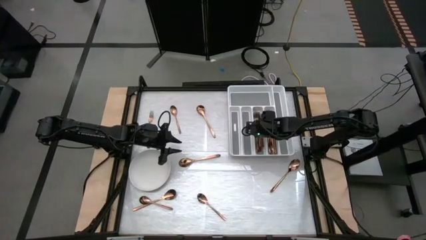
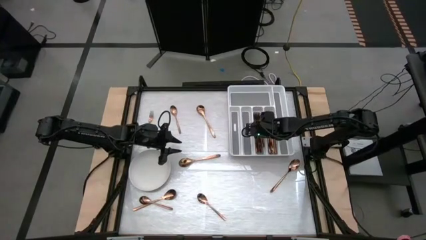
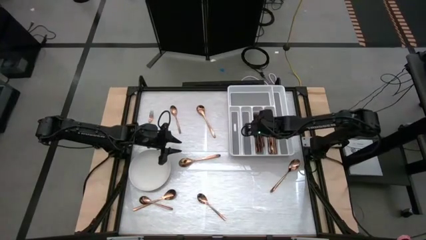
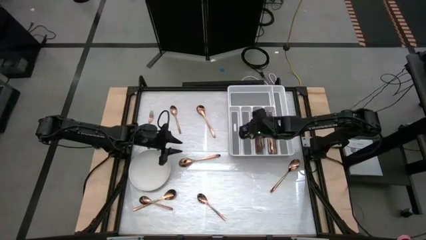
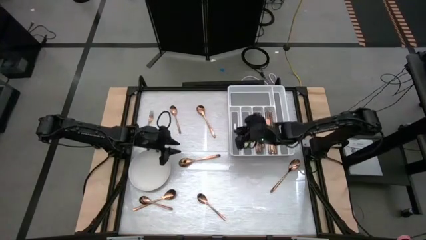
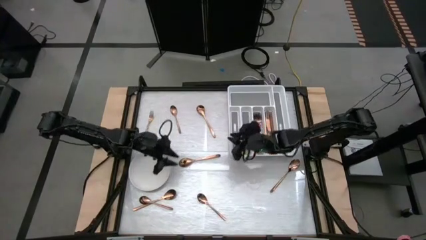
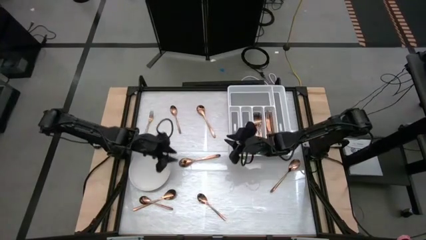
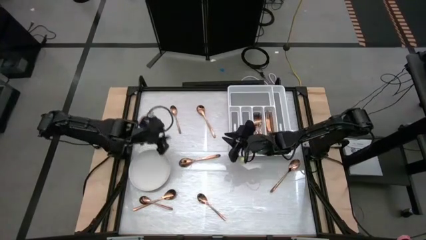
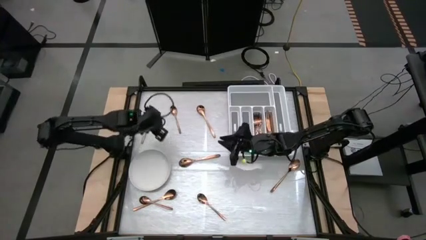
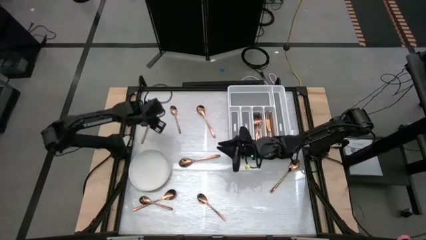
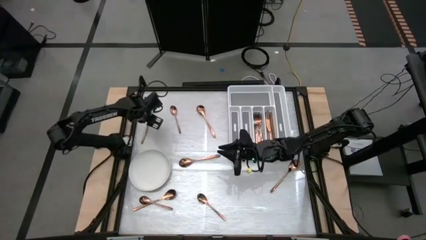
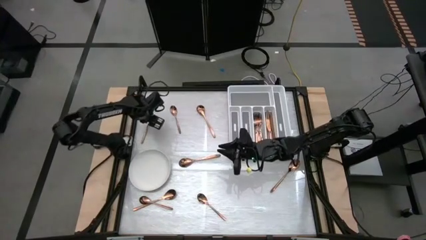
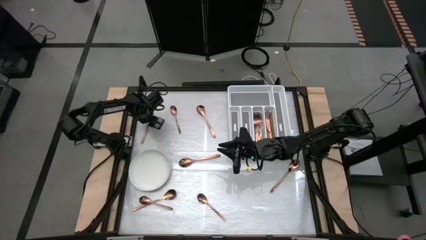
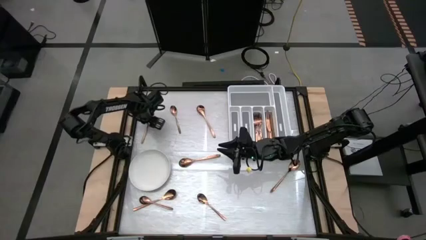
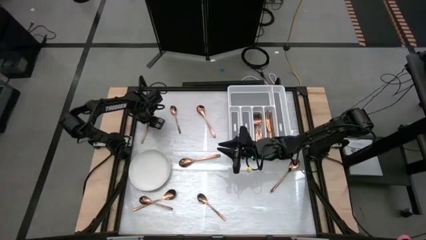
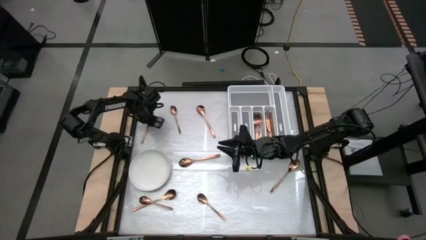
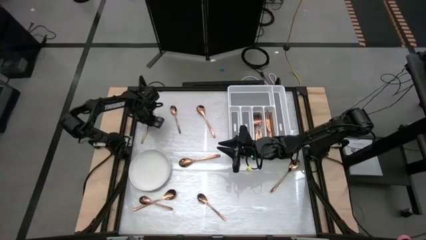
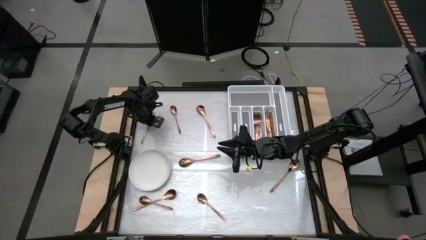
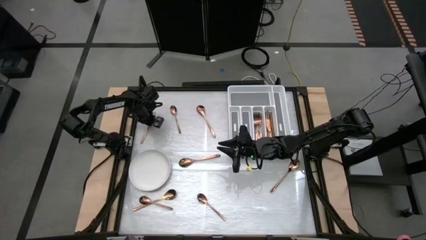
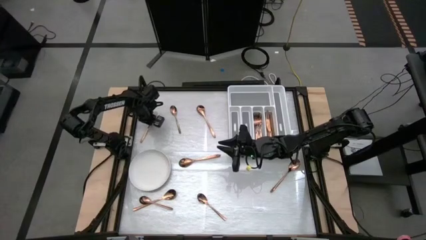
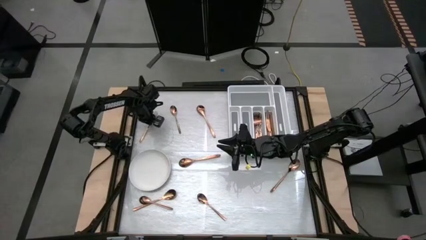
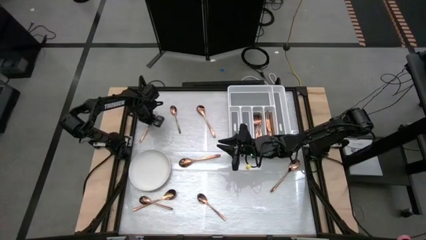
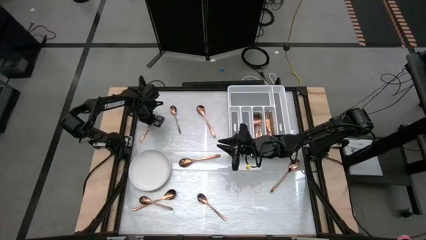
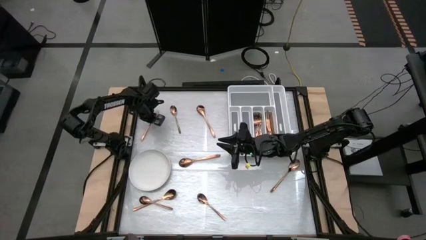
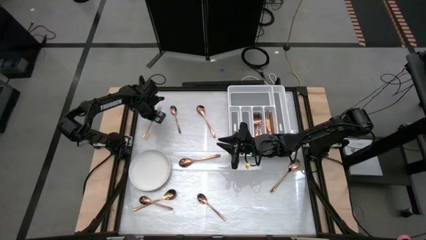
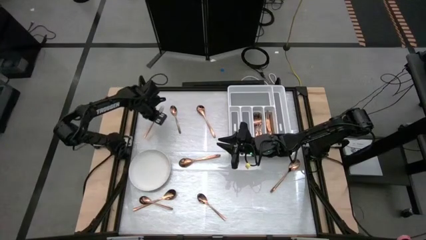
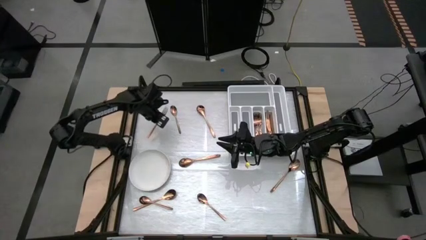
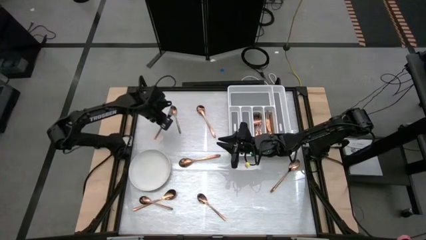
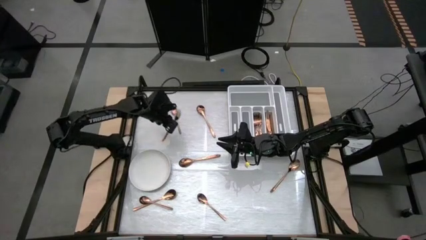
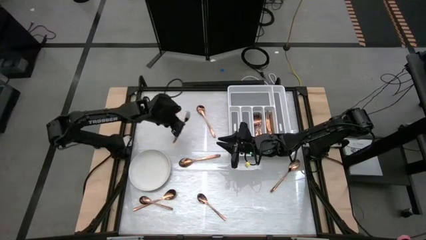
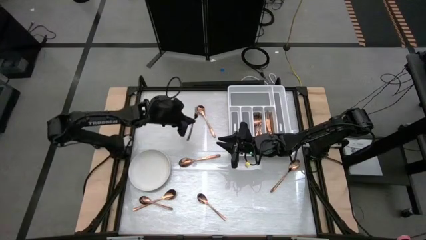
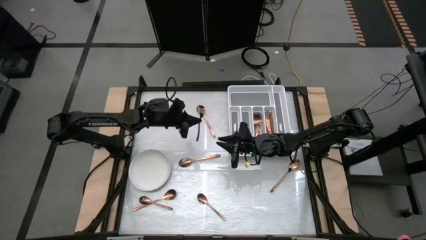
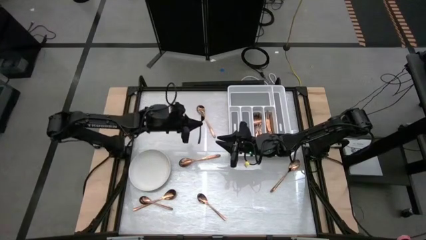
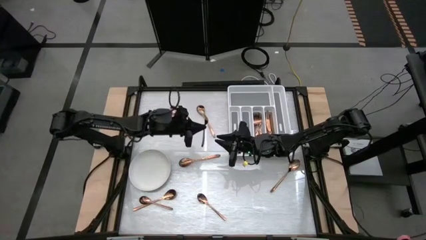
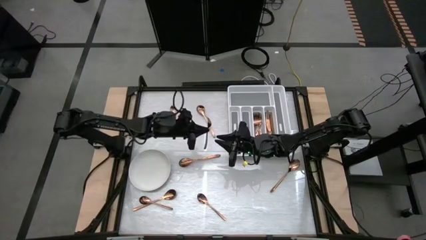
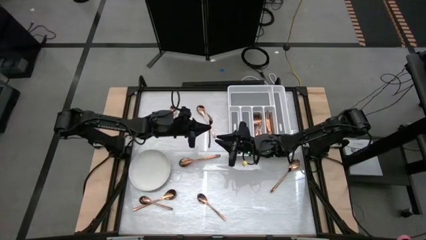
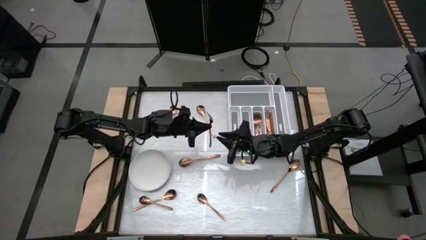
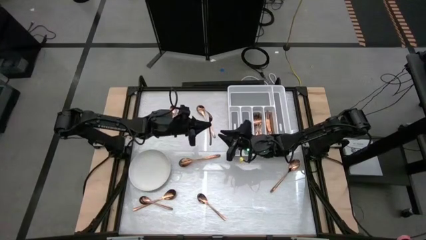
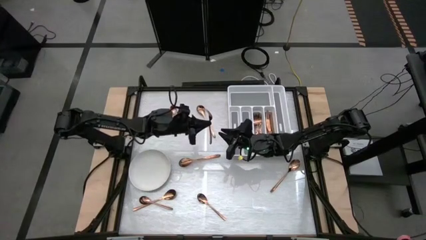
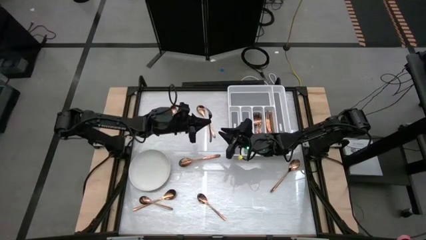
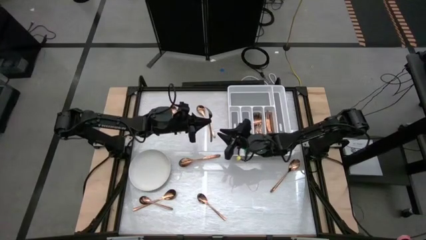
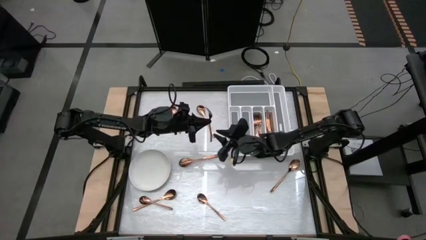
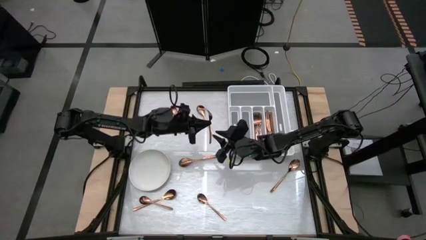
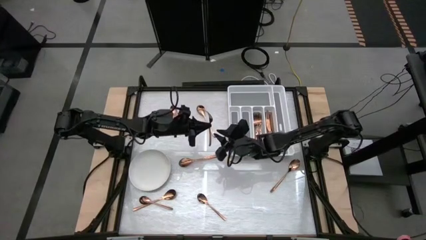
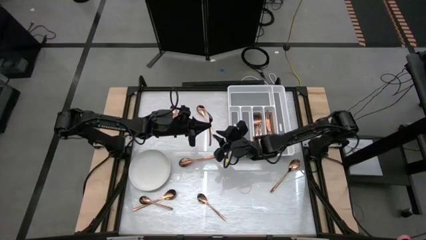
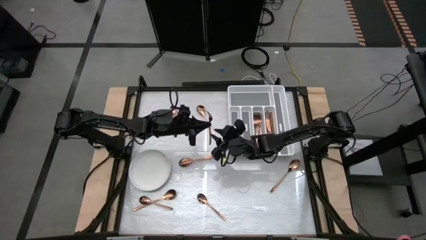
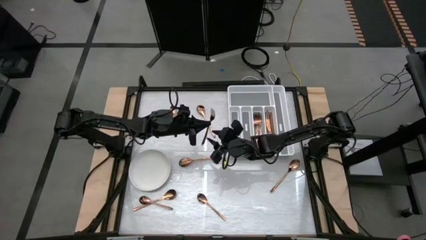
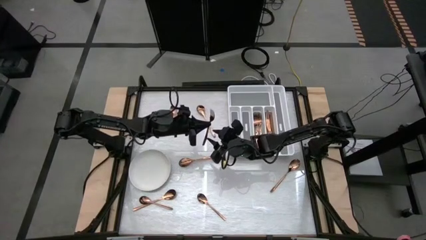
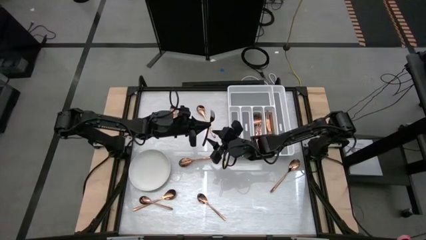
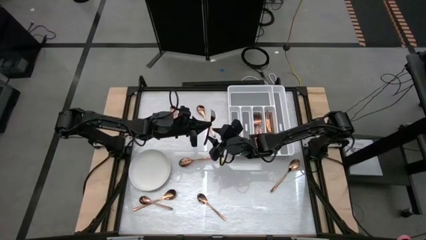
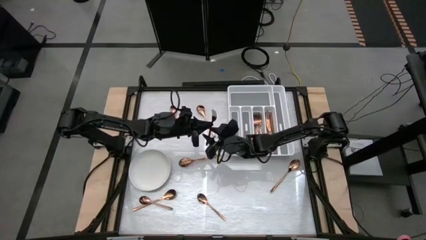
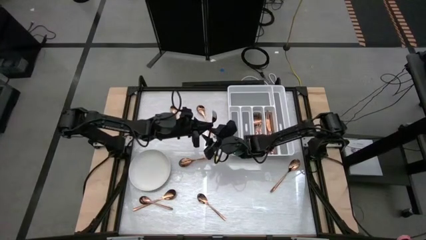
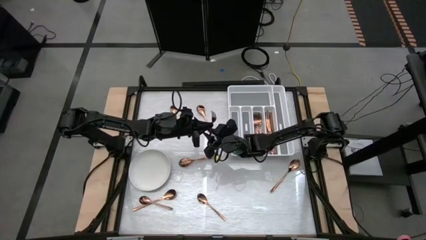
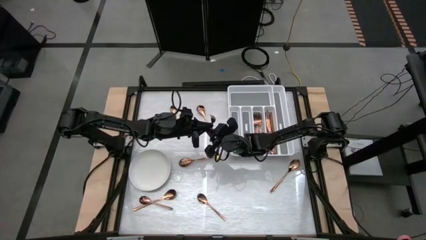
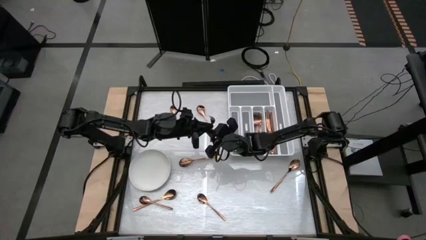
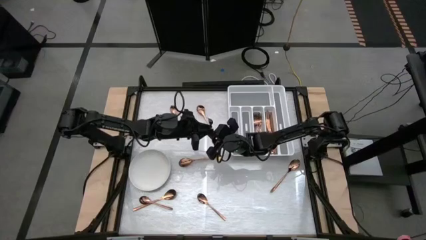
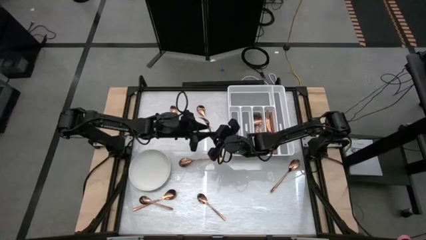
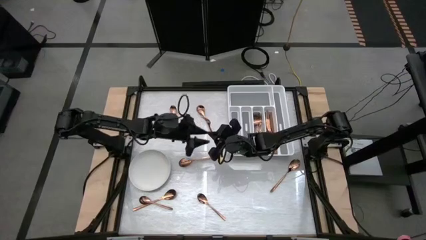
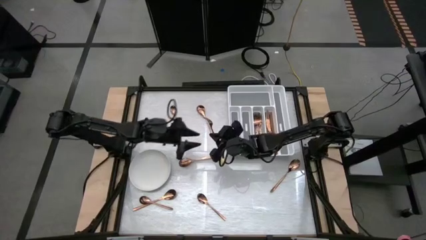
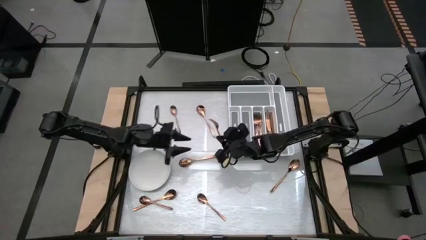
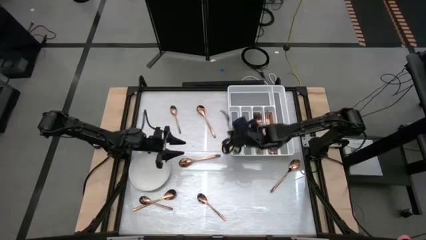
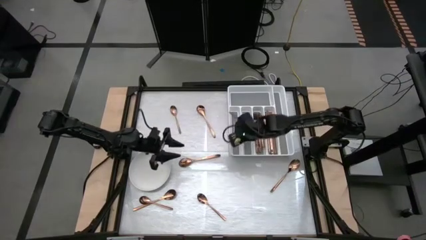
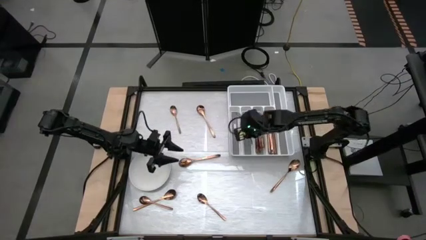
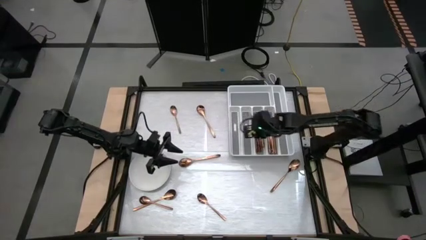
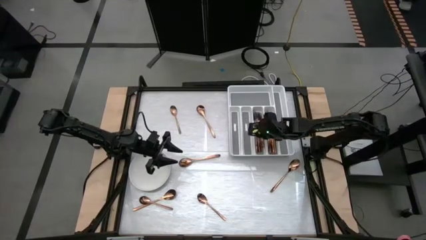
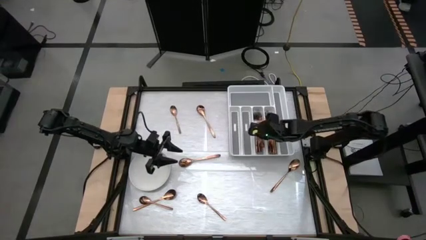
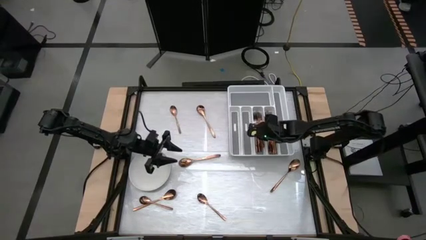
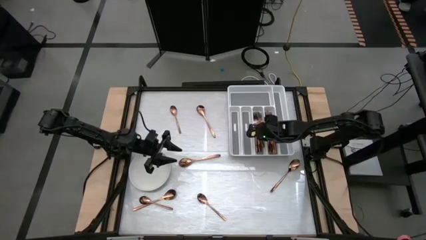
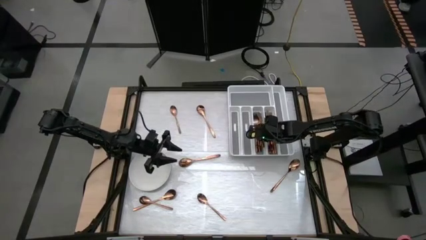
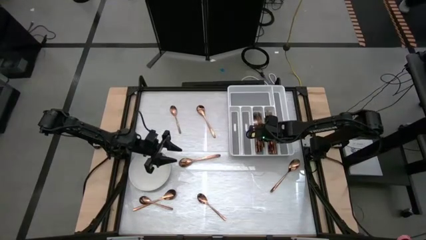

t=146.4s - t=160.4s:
Task: Sort silverware
Put the bronze fork into the silverware tray
